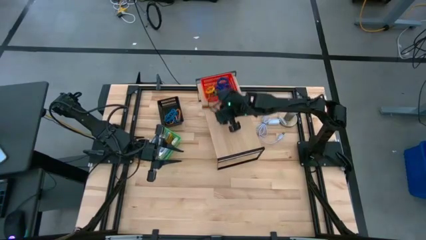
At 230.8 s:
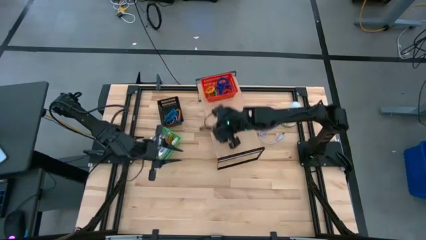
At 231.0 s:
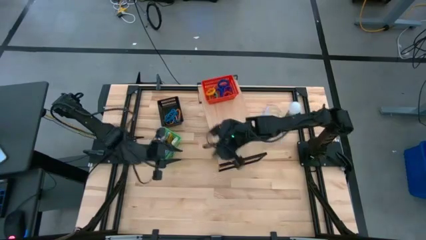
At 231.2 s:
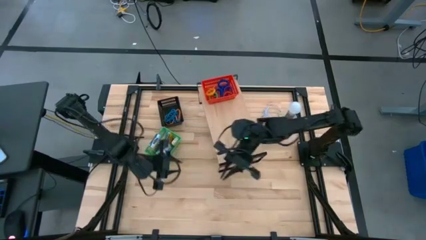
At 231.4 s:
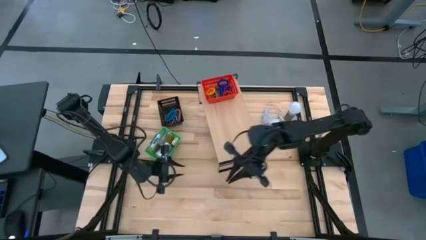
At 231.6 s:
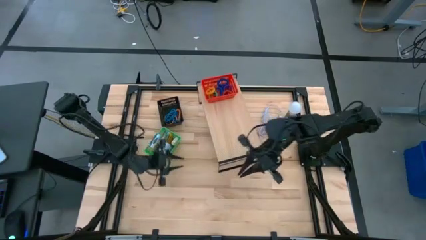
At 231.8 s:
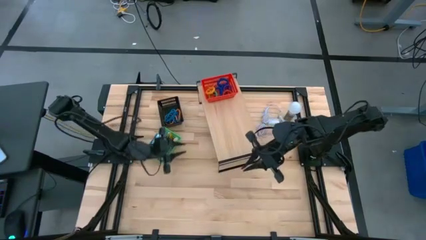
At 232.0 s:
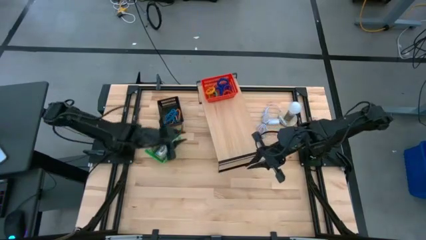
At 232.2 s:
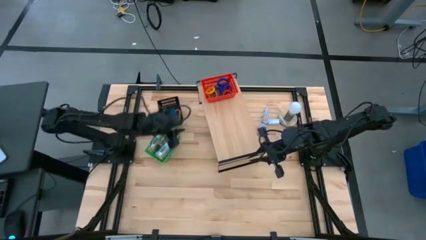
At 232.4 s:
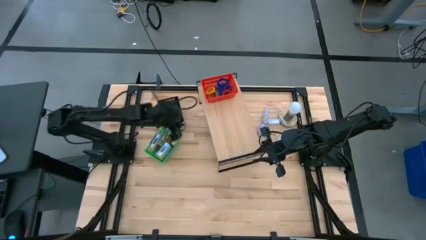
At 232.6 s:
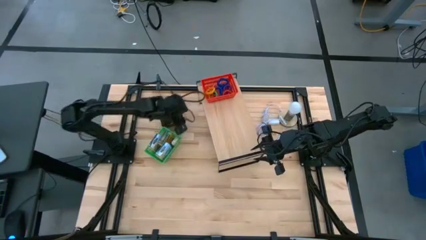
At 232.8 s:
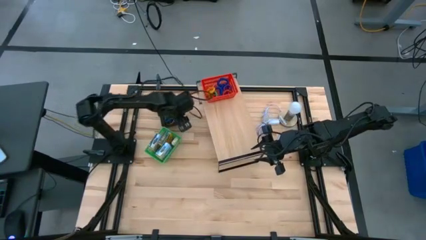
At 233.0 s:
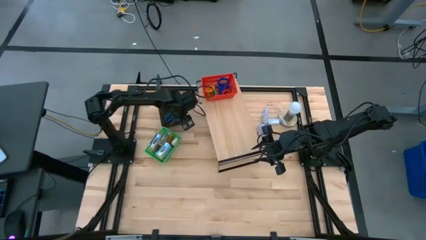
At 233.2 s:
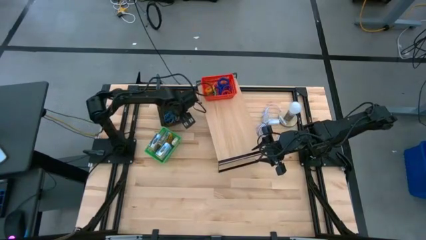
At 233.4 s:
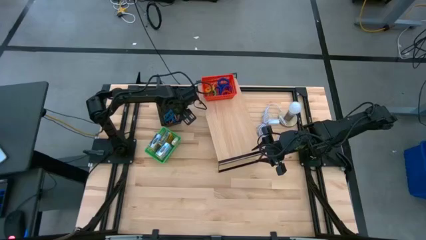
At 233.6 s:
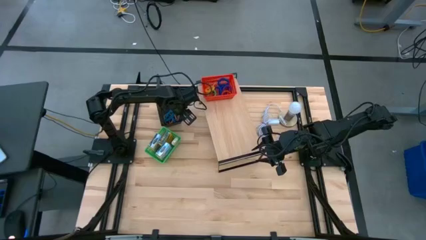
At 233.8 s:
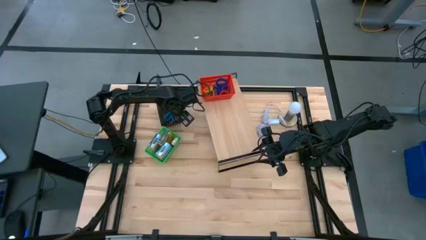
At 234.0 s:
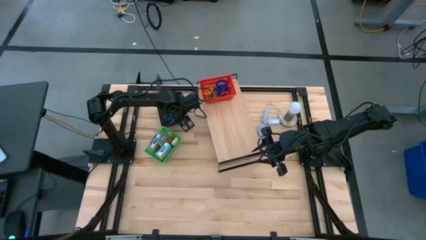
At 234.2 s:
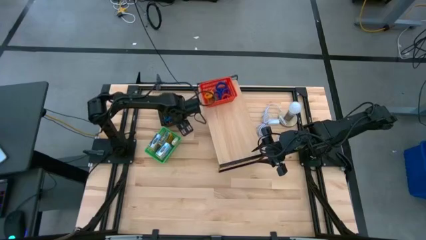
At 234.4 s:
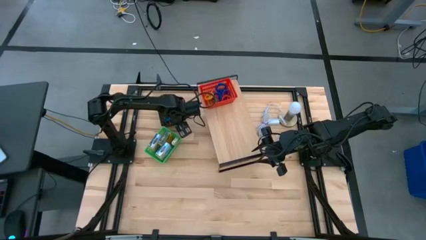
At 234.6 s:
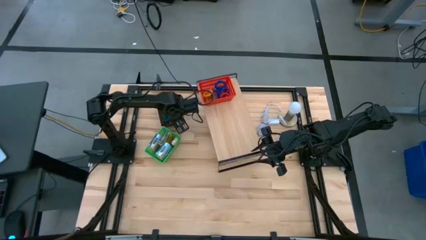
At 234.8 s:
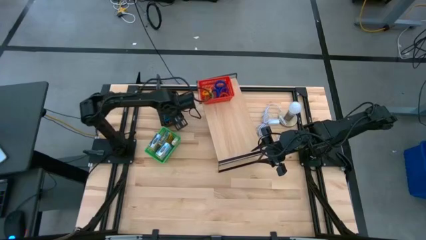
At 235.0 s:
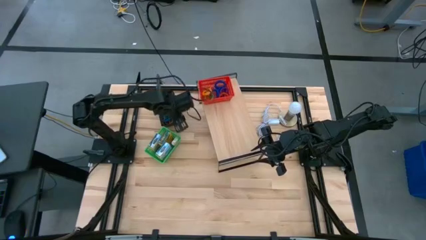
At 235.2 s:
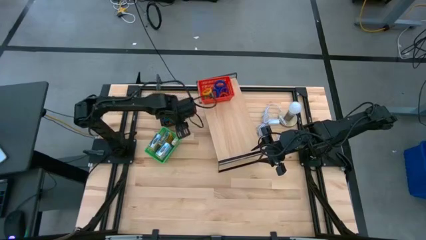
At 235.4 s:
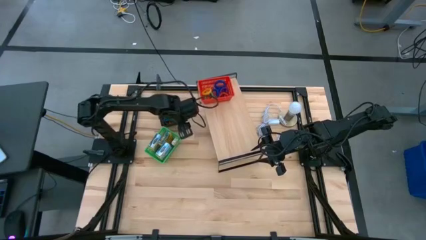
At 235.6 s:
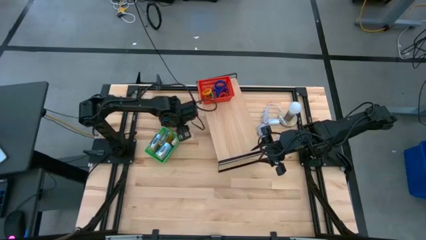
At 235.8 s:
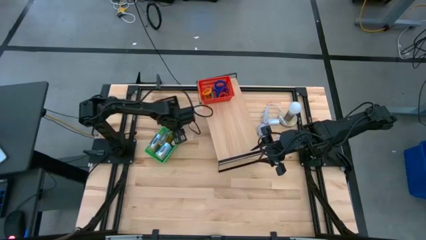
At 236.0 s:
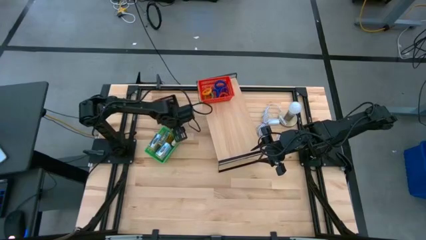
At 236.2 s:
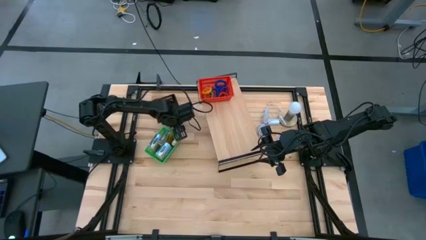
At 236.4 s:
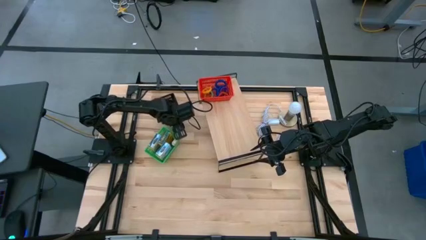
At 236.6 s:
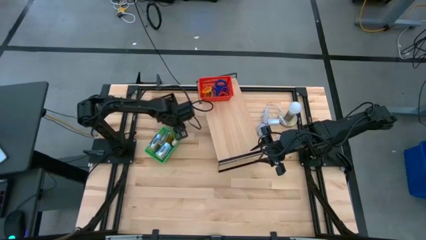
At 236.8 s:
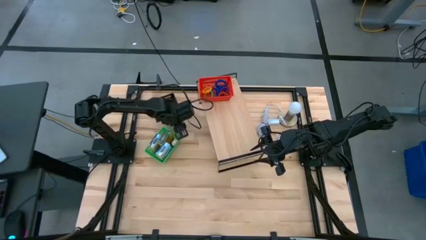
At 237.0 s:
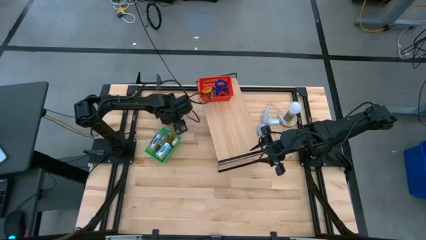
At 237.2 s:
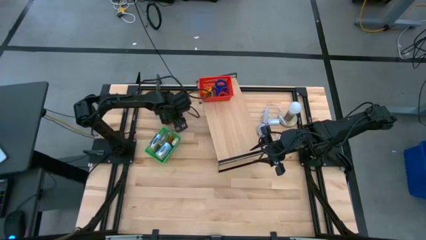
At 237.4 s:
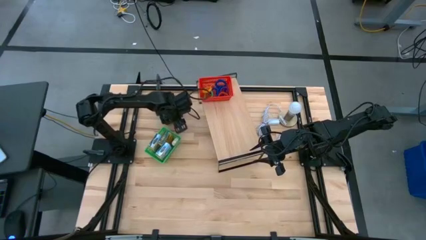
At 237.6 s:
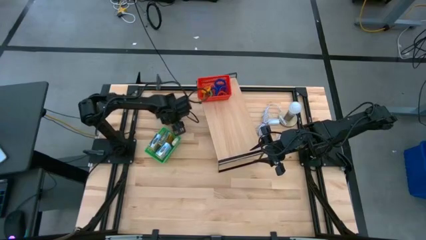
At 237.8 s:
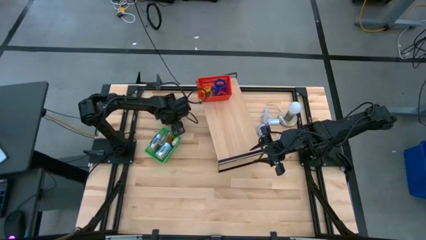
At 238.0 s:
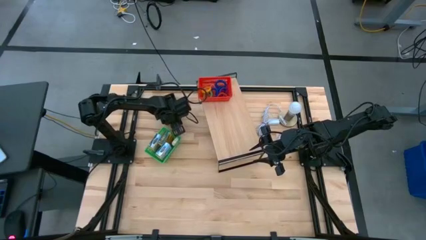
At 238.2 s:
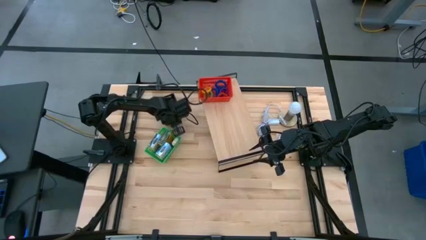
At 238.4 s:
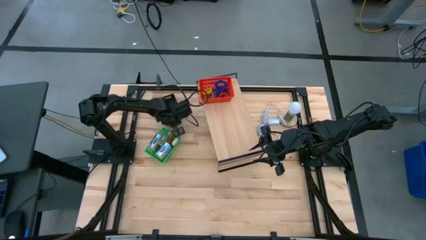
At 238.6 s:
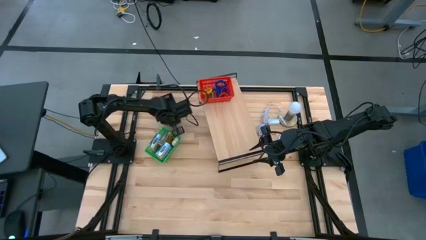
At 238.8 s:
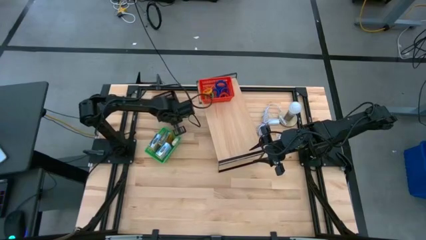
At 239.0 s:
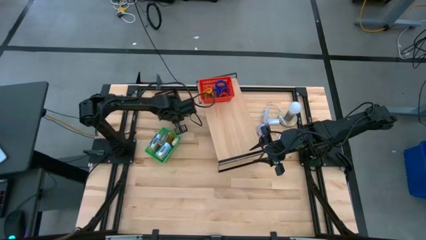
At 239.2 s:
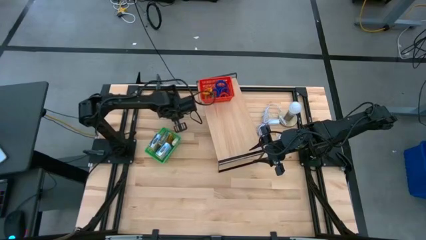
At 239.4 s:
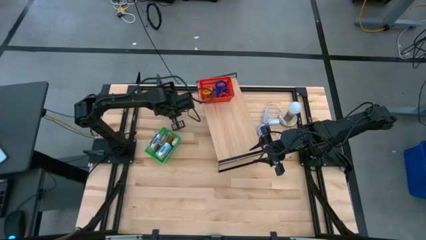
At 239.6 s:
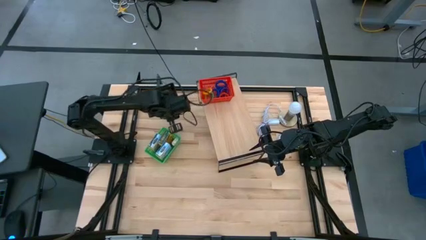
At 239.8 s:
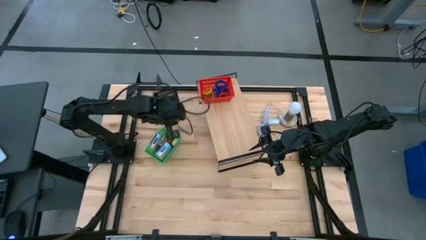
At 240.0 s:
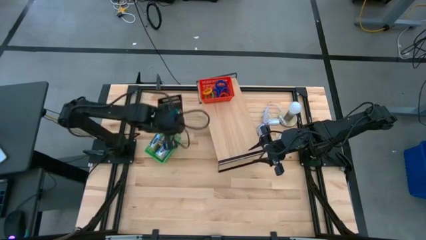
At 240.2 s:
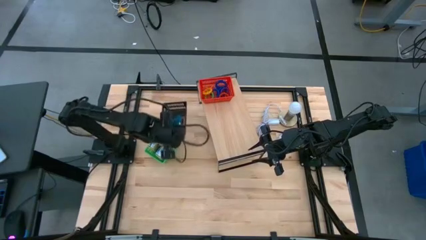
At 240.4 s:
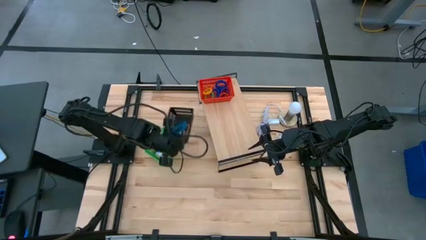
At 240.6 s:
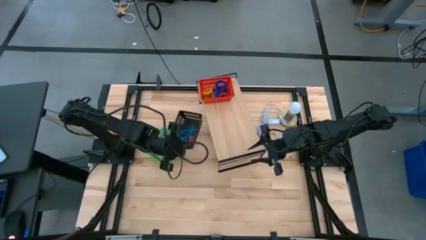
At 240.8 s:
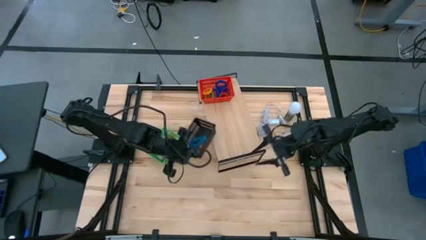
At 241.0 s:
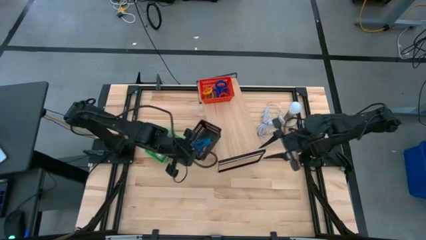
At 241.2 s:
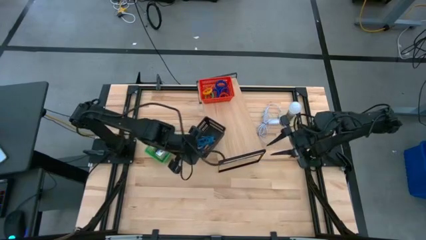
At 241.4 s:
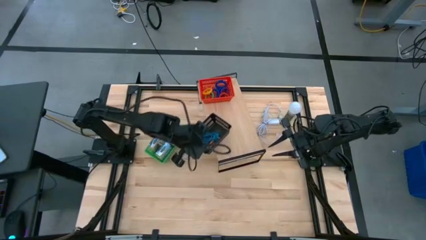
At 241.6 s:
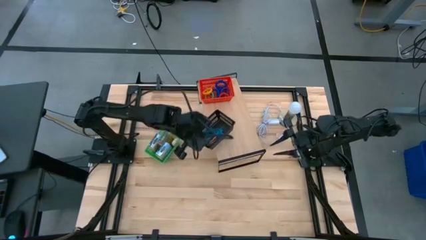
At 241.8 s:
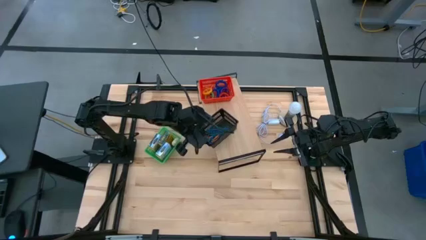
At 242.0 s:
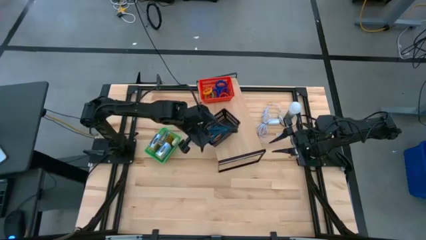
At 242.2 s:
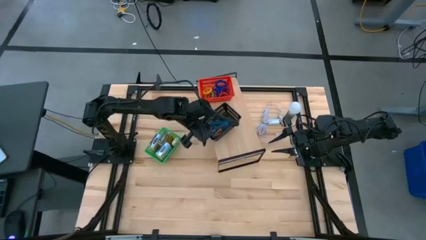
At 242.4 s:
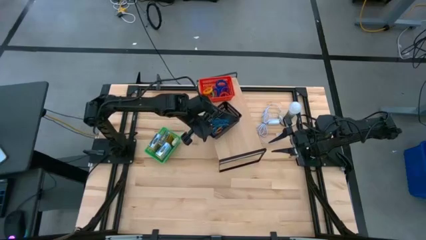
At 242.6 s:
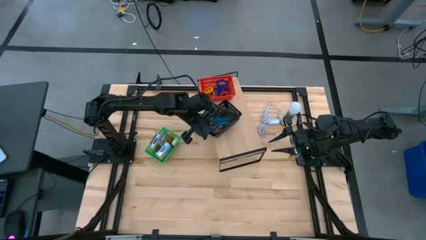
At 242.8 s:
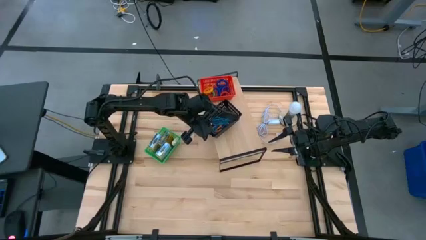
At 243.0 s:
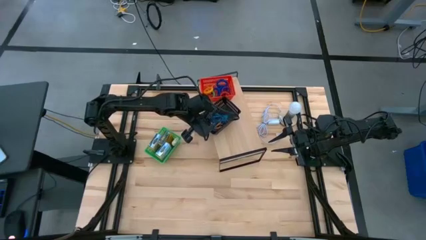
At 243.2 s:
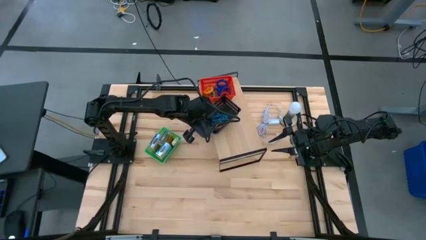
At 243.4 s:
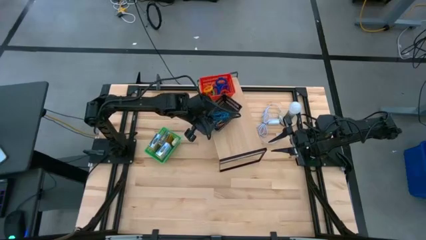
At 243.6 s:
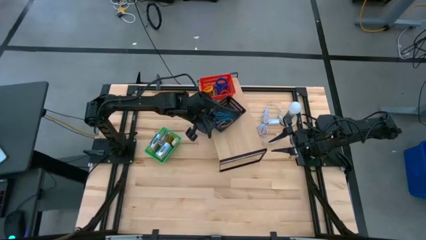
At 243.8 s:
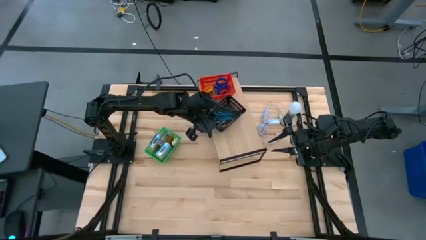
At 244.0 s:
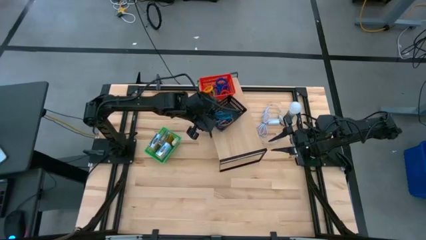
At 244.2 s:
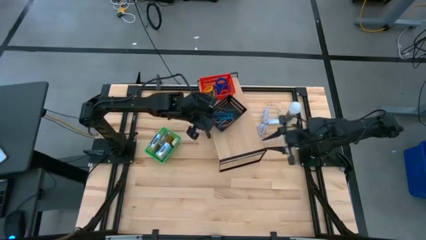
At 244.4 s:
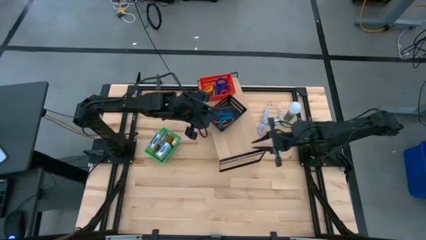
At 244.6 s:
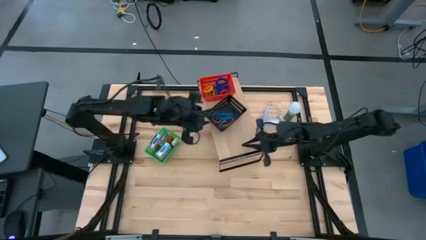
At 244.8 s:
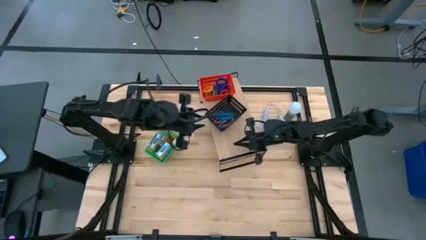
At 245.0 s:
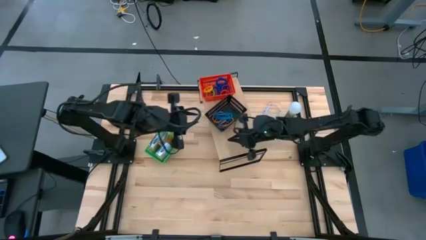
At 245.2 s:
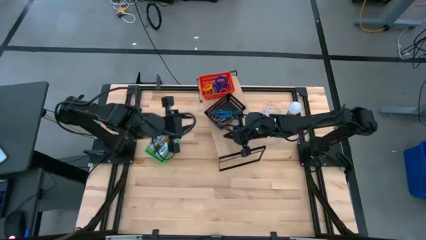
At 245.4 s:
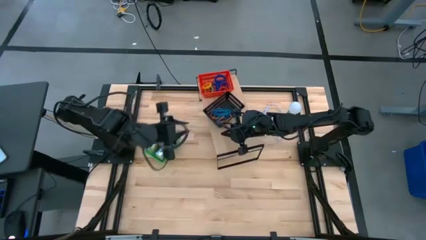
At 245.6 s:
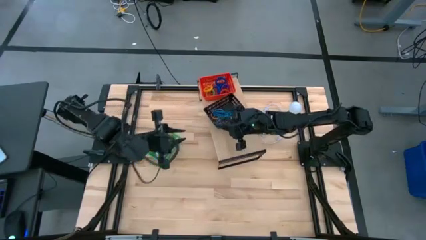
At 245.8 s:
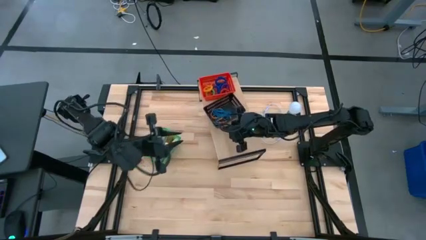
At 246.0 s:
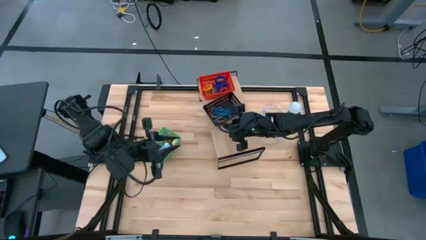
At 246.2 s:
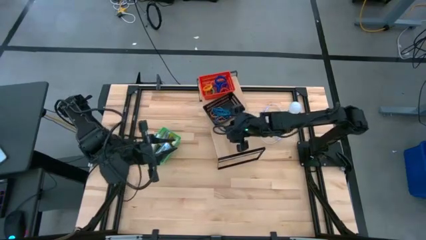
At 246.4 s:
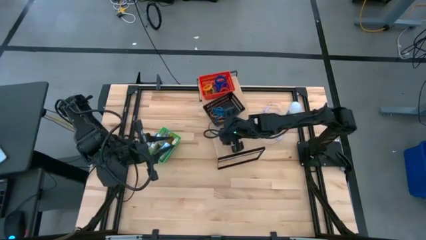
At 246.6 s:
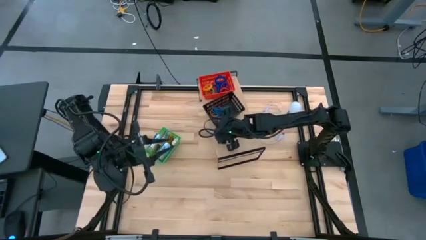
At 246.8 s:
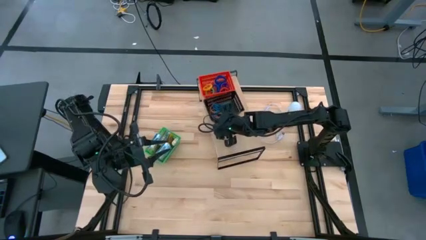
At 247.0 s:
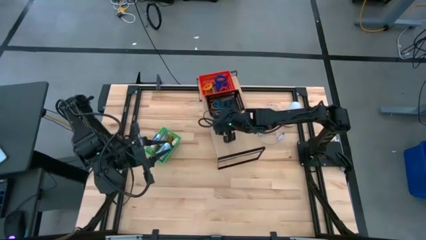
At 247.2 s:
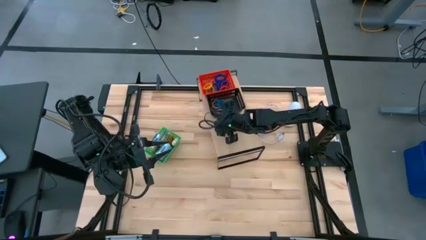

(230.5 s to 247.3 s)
Task: Pick & Place Office Desk Supplies
Put the black basket with rubber bands on the shelf
